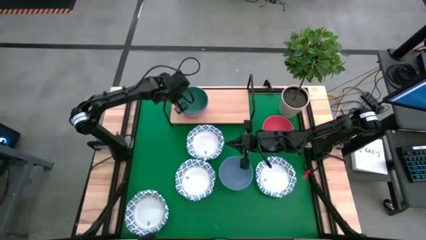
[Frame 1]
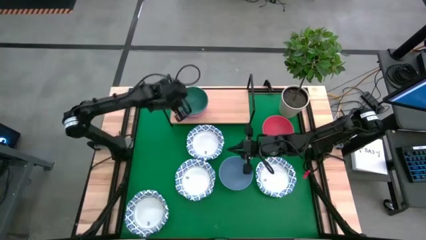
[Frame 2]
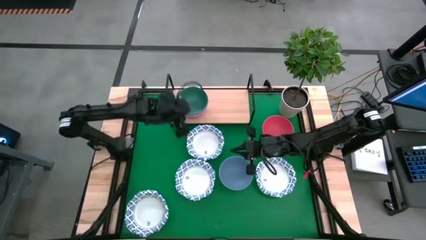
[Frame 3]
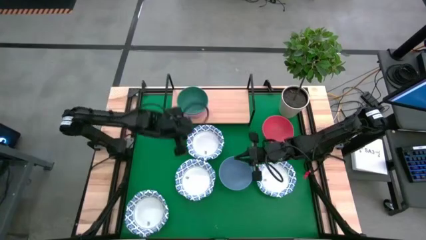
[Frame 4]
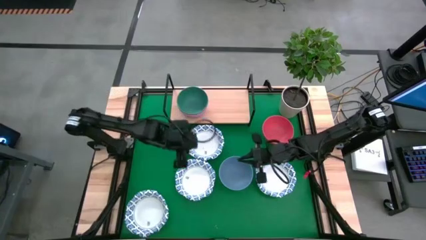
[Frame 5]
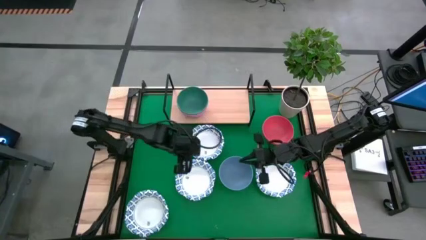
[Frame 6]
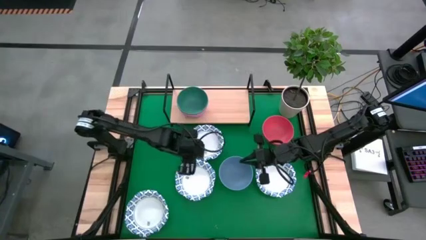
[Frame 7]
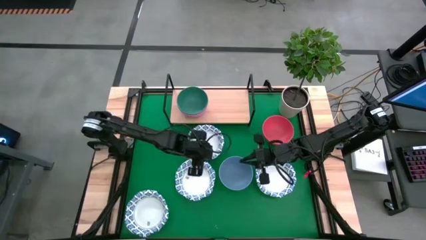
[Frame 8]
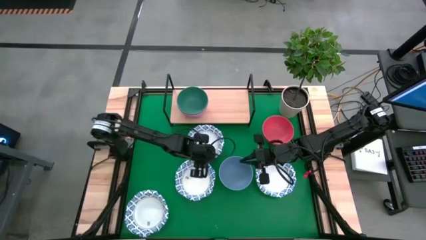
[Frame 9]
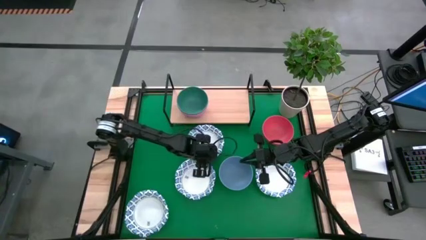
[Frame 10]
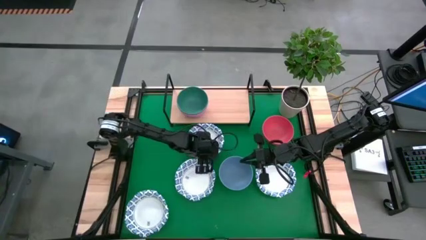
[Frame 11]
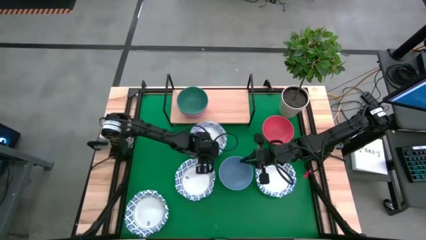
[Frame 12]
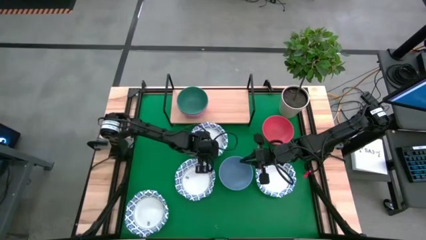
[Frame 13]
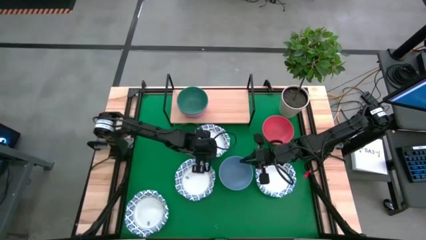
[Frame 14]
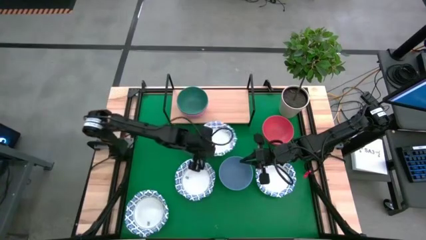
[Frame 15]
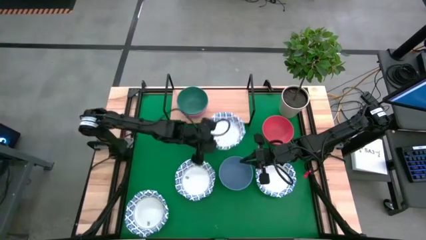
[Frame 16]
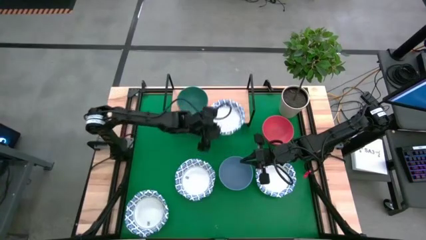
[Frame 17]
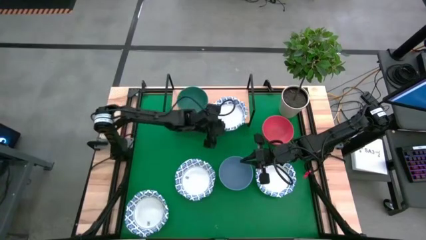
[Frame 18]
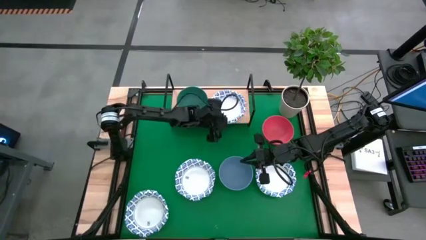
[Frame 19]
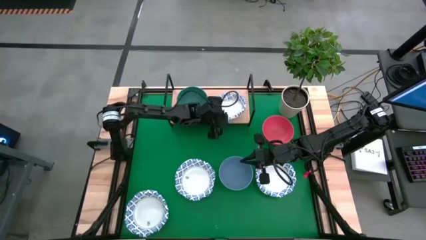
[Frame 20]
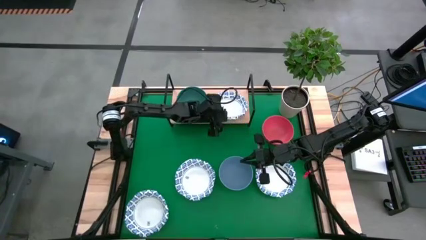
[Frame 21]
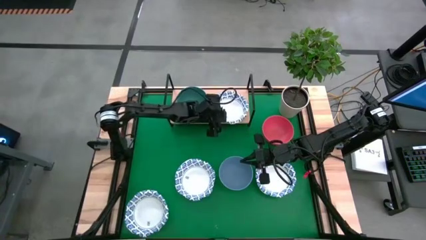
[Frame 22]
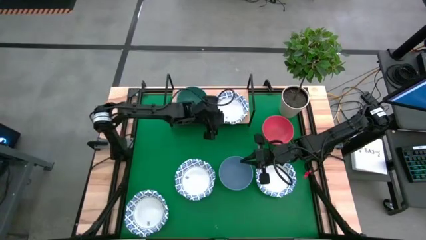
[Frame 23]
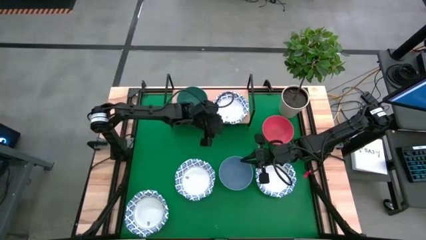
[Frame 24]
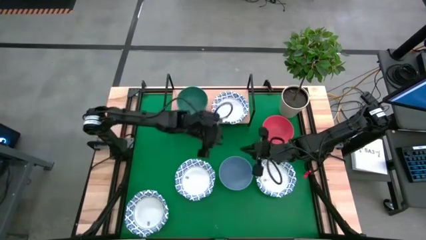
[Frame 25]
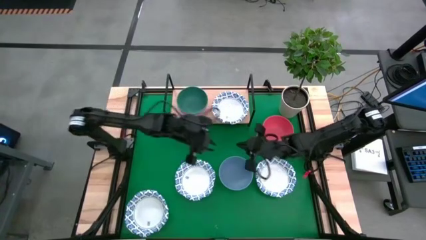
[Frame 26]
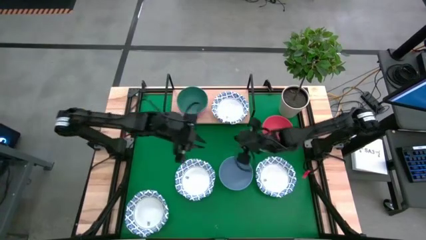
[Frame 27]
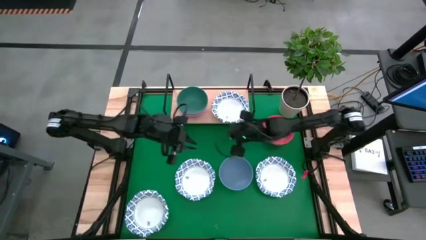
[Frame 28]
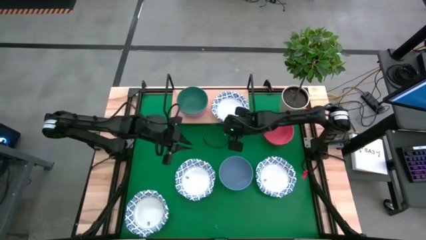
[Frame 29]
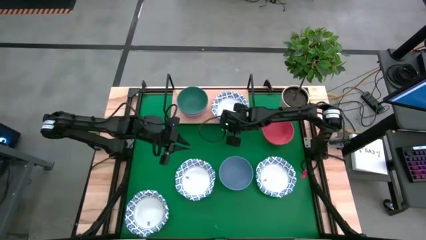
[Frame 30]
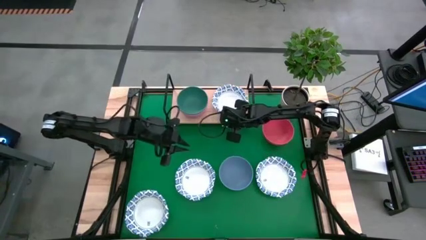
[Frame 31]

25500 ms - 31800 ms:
Task: Place and stack bowls onto a shelf
Put the blue patterned bowl on the shelf

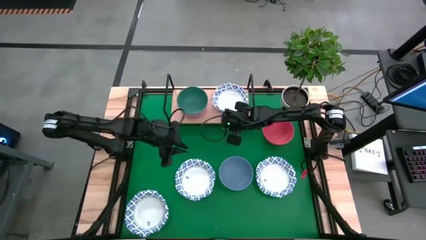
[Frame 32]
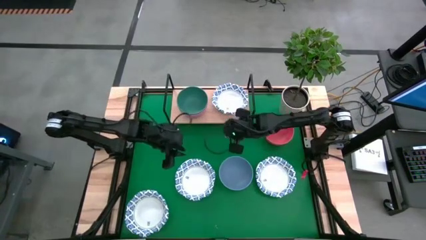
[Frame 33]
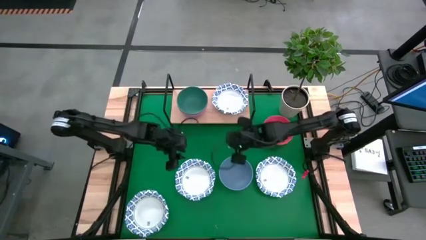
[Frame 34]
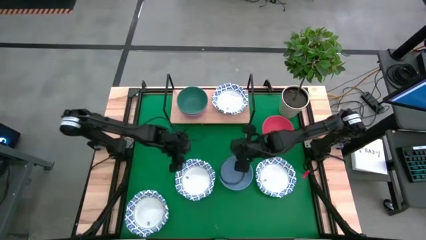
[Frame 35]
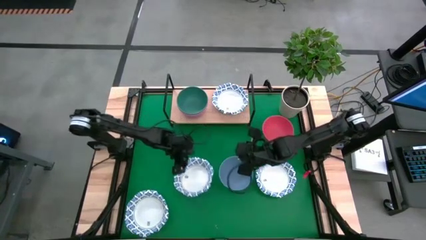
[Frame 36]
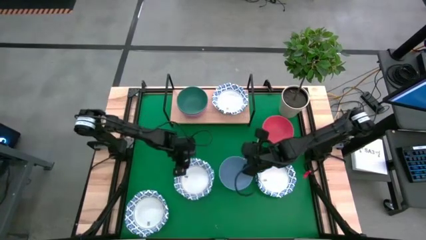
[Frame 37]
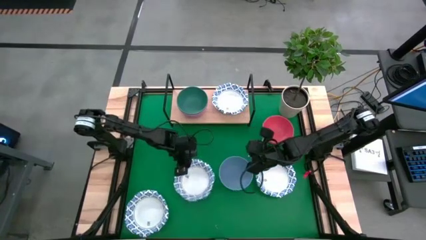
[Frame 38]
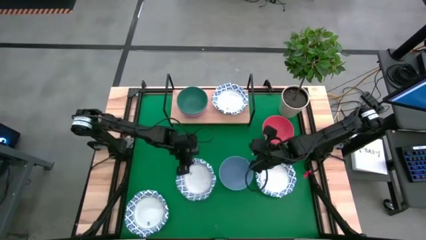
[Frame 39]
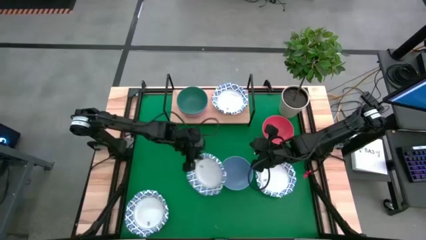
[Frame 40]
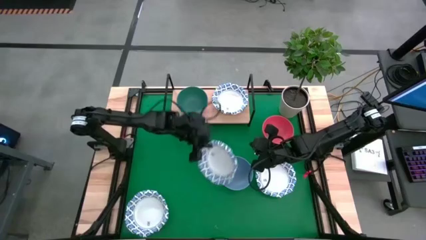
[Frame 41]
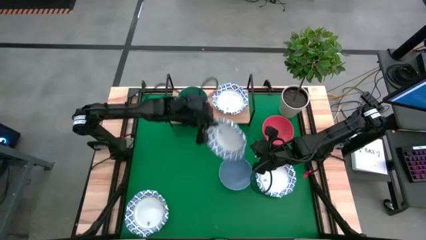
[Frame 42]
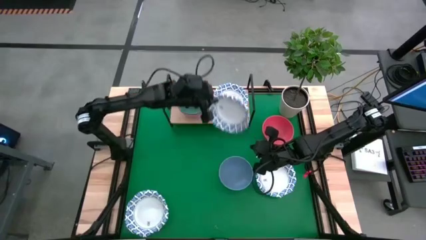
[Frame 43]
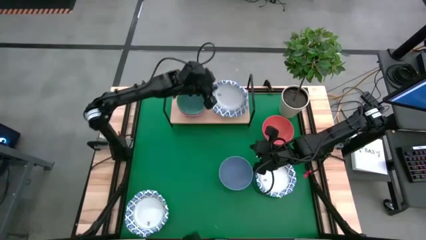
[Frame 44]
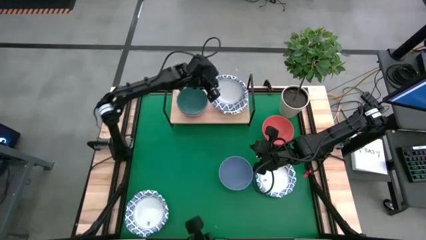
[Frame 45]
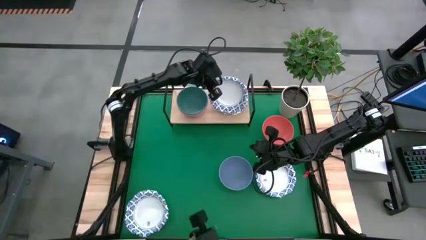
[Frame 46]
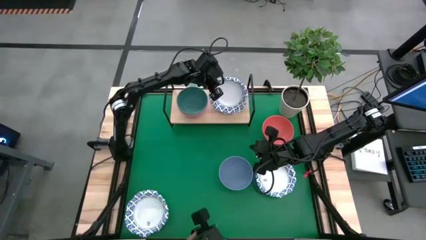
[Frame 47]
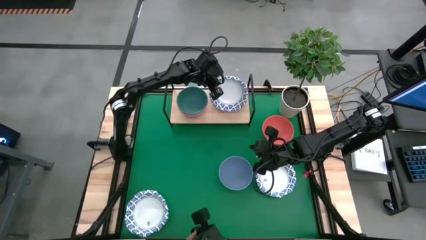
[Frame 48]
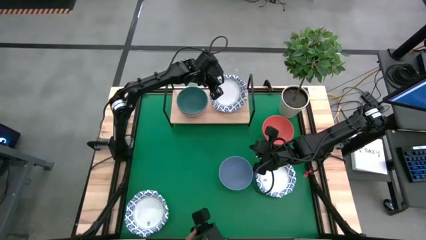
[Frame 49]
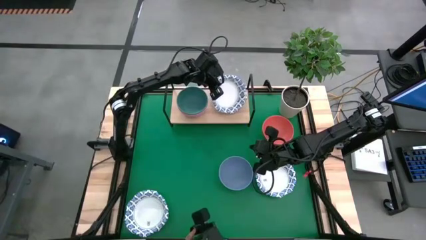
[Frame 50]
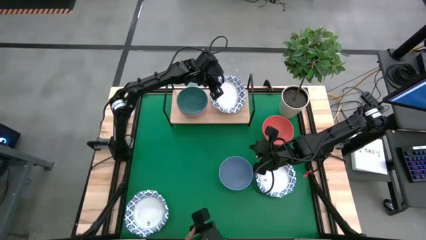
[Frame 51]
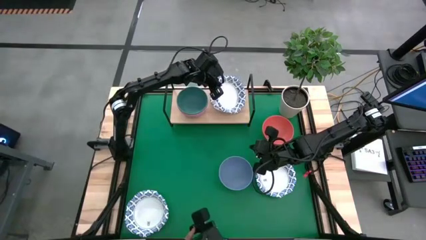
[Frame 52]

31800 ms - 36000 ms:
Stack the blue patterned bowl on top of the blue patterned bowl on the shelf

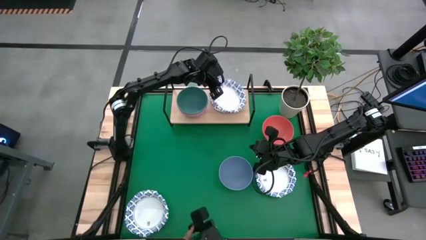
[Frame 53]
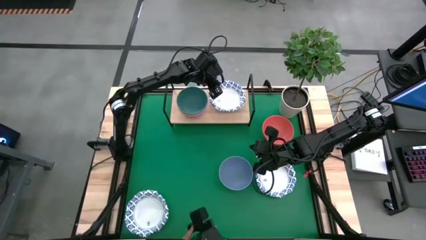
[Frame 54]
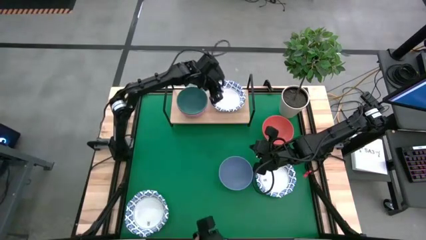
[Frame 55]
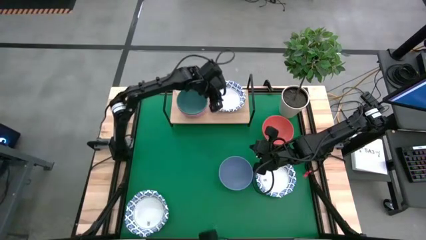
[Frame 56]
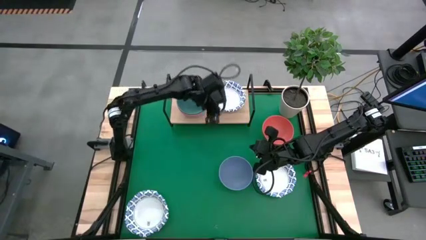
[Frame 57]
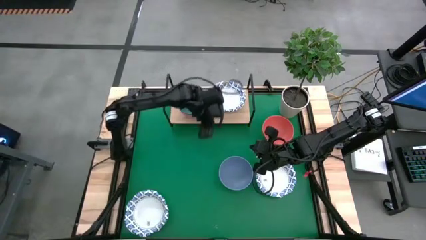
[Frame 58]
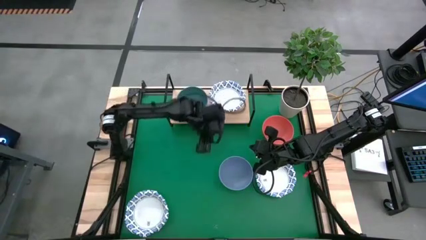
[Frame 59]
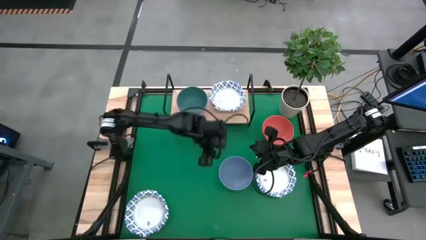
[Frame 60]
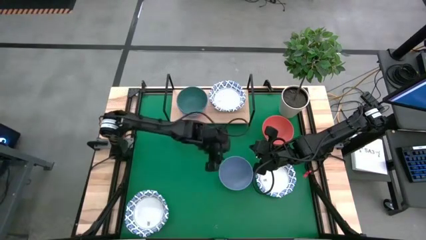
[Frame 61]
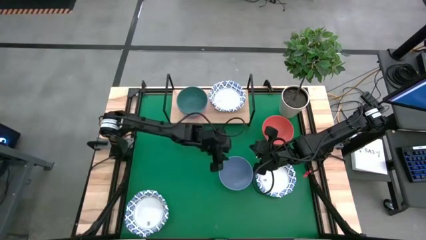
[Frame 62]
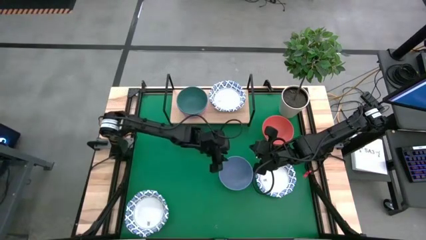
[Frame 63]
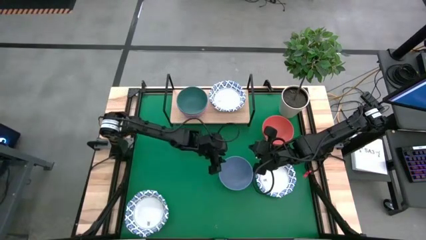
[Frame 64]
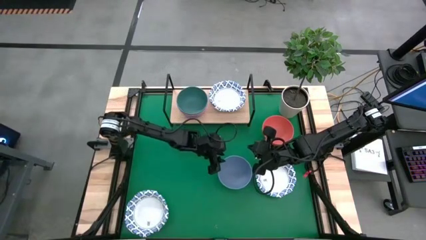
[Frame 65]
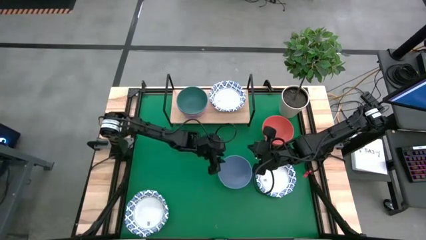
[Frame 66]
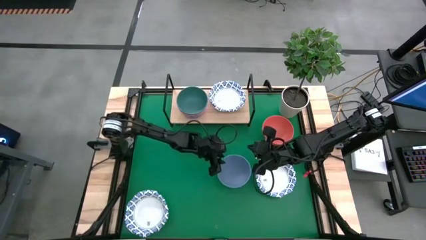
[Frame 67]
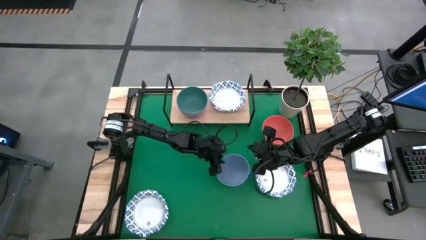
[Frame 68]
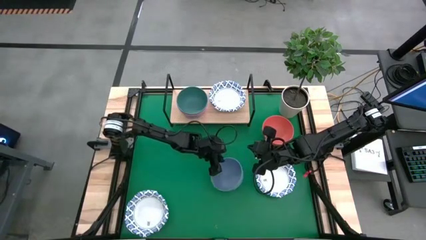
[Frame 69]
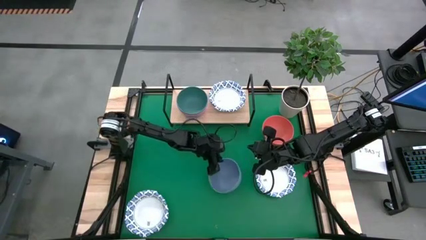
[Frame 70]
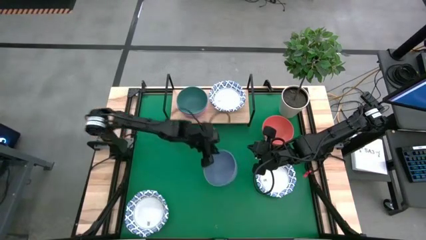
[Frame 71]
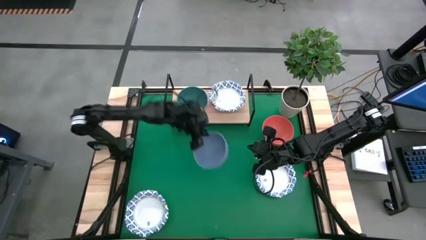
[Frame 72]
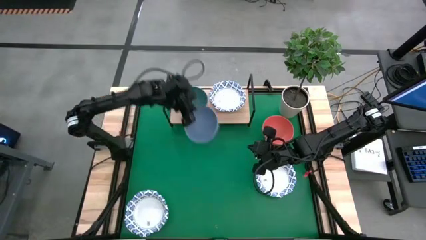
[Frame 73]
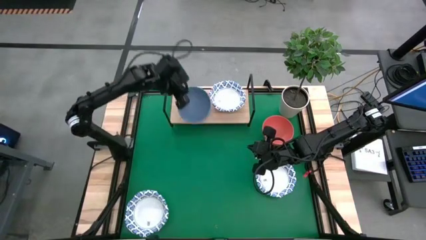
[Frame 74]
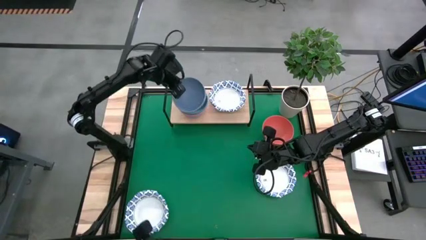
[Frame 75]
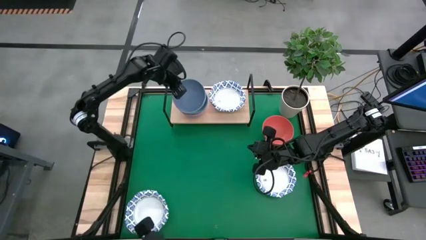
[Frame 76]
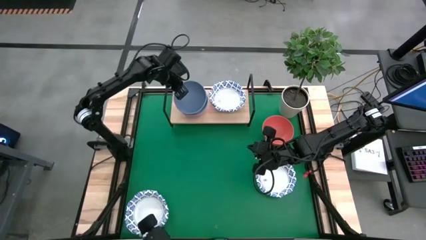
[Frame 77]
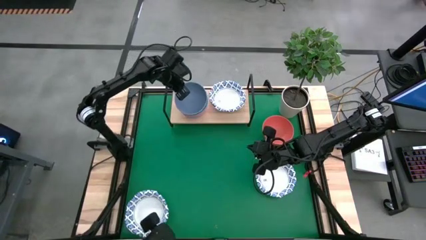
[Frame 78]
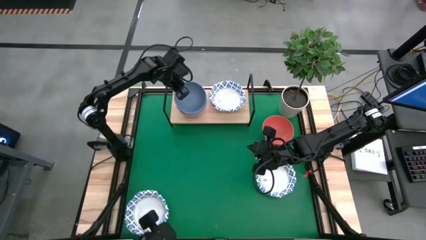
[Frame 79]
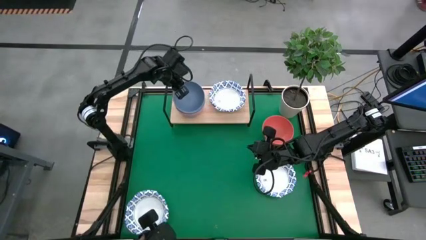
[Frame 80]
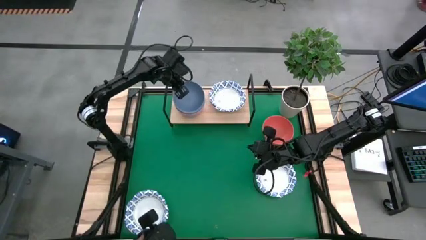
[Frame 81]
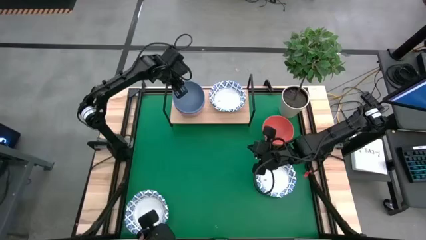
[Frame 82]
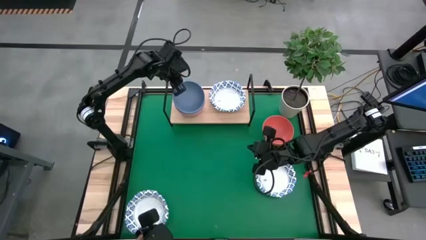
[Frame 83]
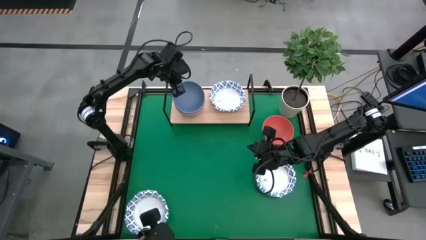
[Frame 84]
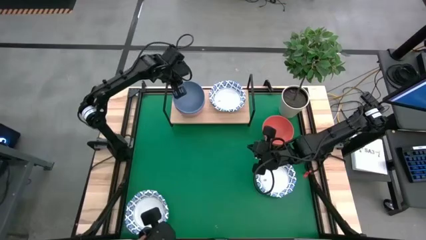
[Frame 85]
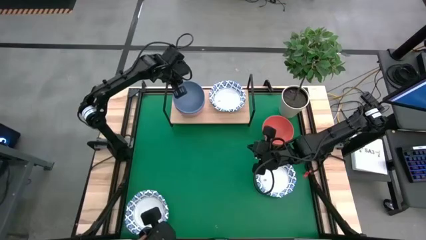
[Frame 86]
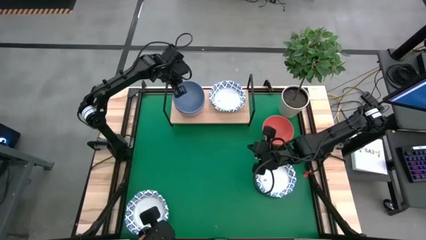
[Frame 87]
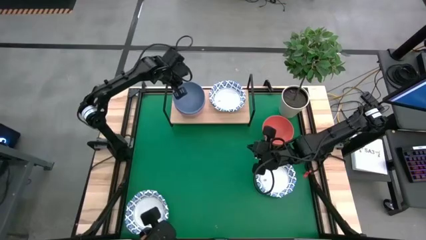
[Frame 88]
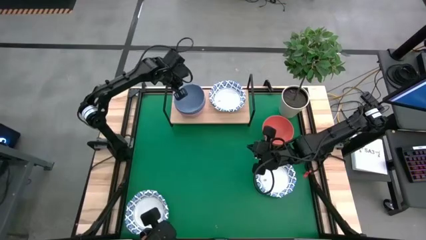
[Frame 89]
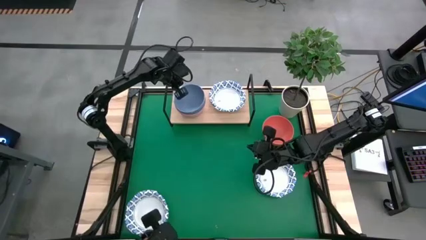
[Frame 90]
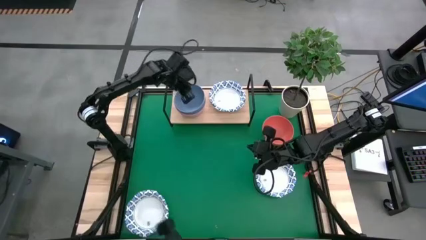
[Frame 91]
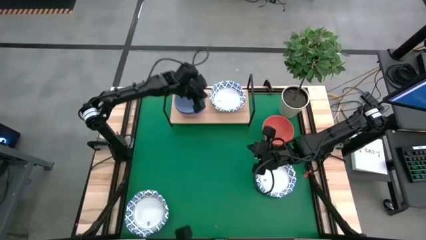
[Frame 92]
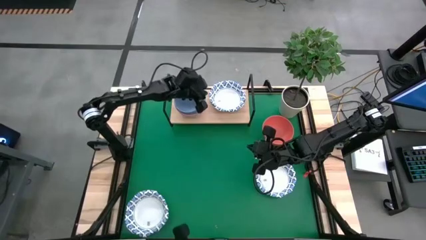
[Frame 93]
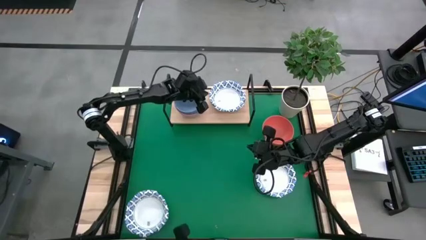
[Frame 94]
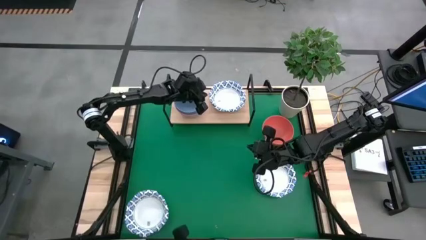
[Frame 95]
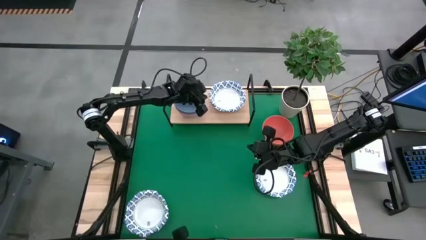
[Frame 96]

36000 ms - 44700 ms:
Stack the blue bowl on top of the green bowl on the shelf
